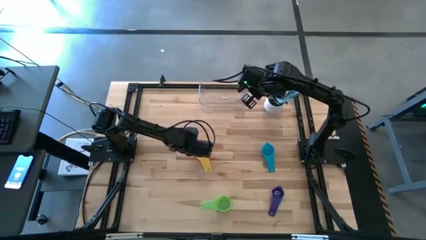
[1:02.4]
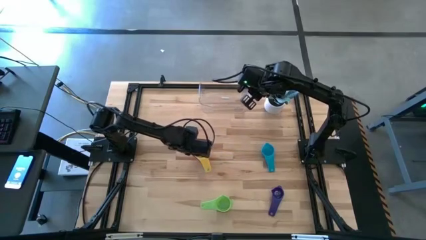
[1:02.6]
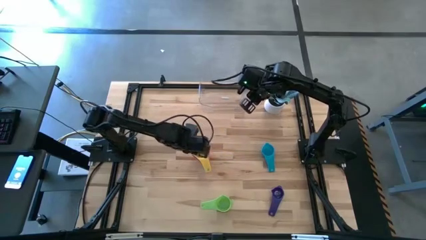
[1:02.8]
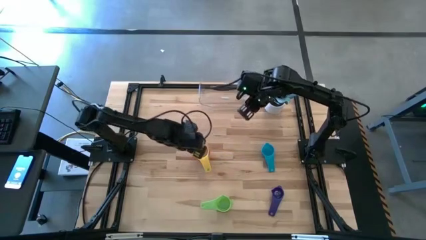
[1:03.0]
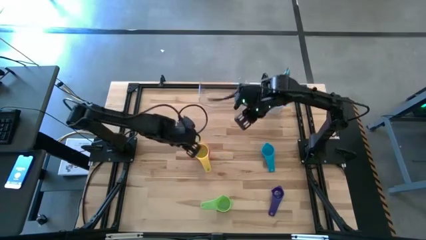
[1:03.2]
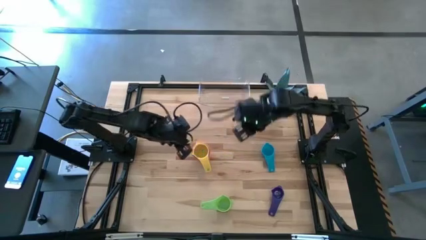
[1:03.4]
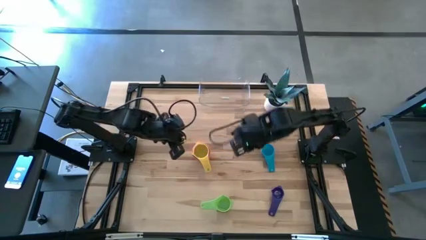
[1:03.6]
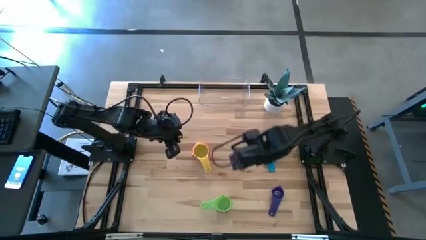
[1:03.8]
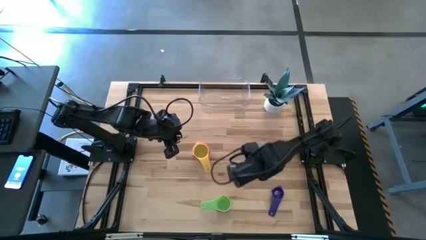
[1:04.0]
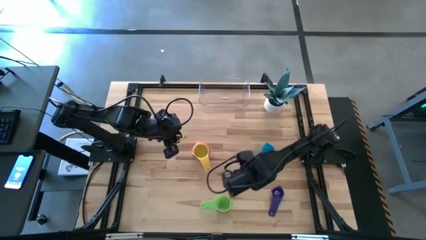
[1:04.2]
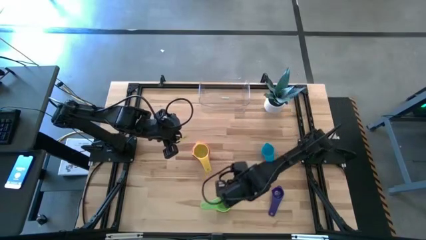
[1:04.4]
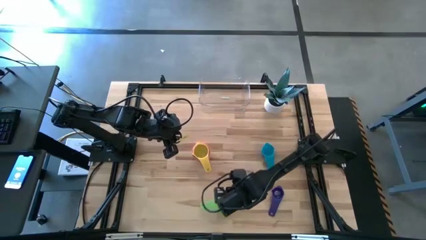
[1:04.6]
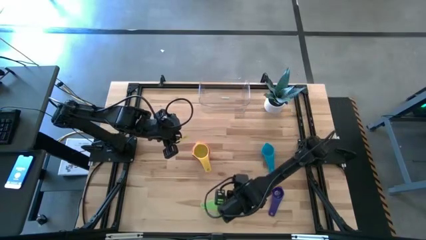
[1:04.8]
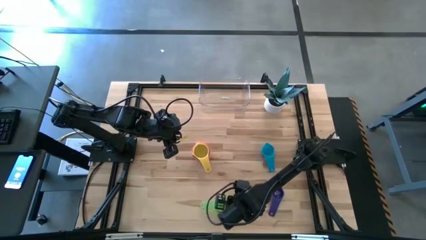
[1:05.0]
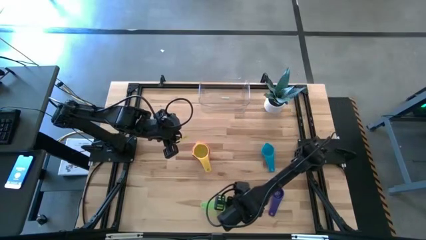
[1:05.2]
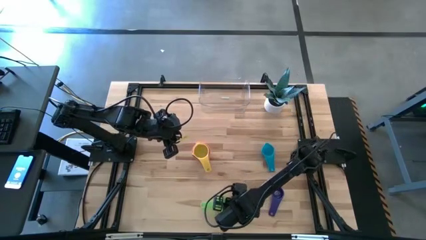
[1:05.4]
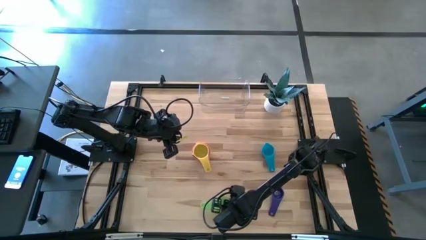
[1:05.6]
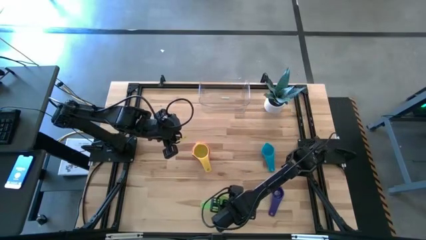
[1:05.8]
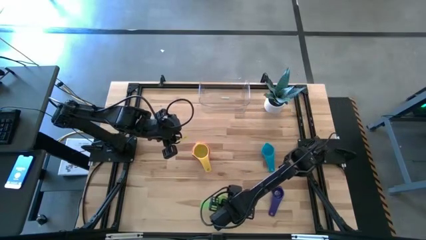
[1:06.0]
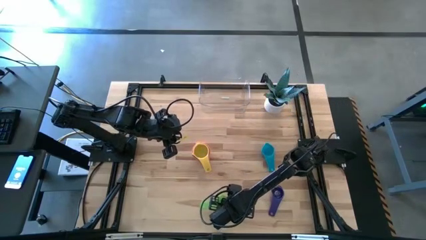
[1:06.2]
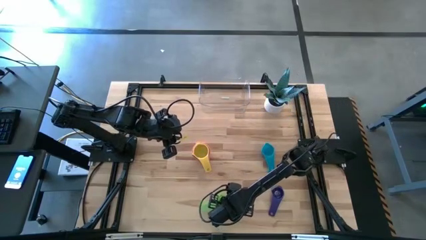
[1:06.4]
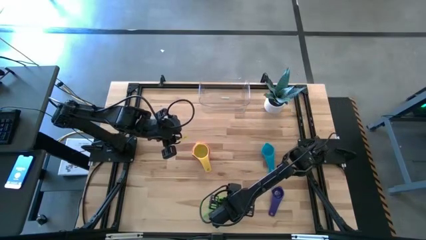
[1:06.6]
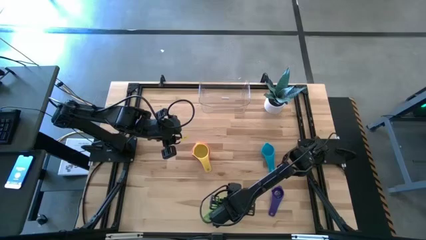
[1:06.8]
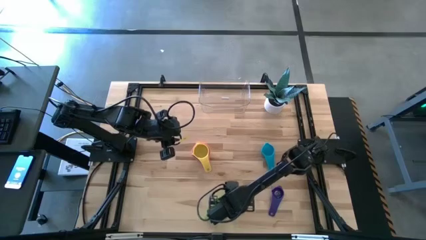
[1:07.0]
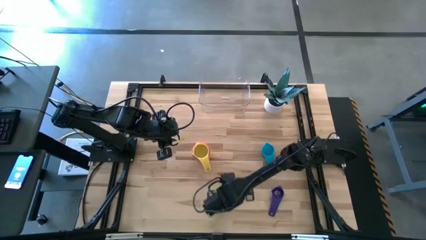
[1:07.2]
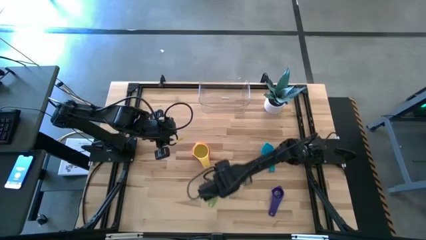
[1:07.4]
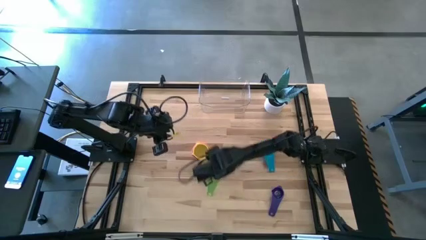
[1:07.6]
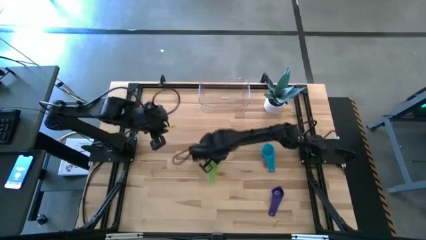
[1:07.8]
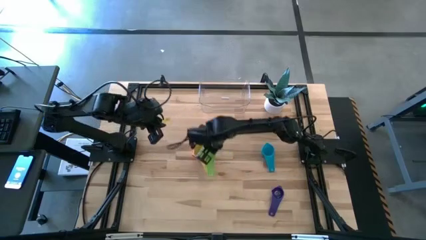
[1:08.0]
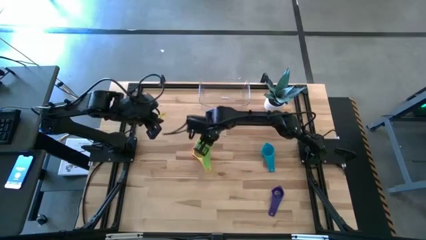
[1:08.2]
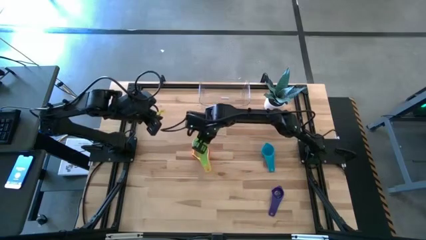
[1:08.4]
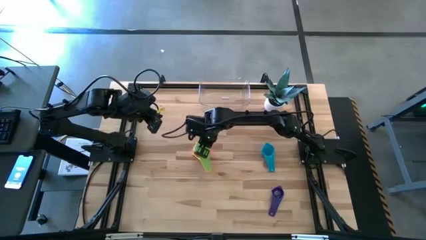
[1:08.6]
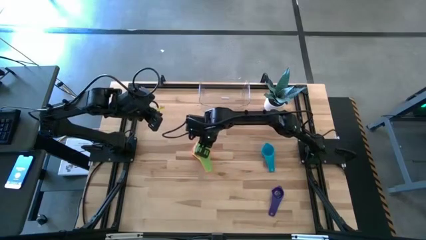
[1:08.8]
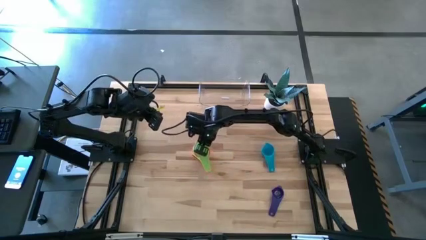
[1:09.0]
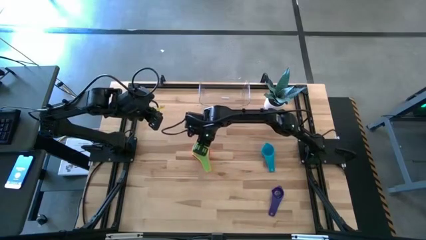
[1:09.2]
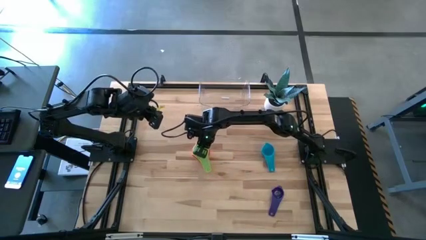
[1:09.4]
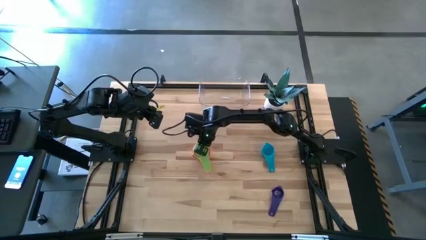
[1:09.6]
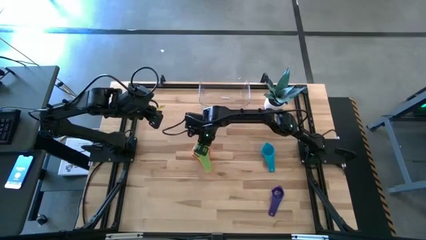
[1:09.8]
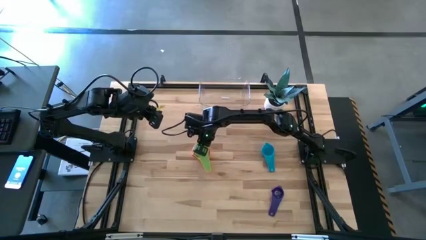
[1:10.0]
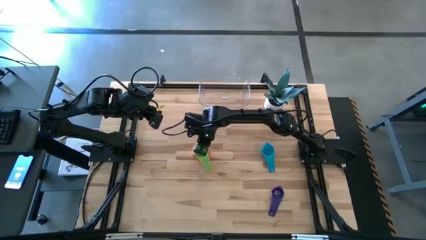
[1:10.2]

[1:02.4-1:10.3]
Task: Nest measuring cups in basket
Stack the green measuring cup on the top of the yellow measuring cup

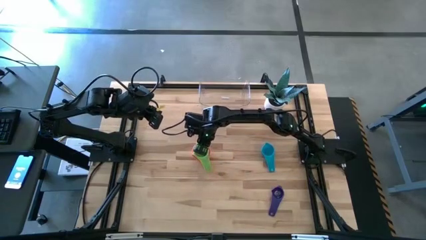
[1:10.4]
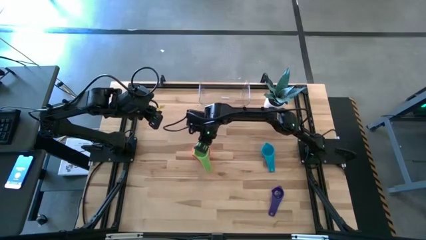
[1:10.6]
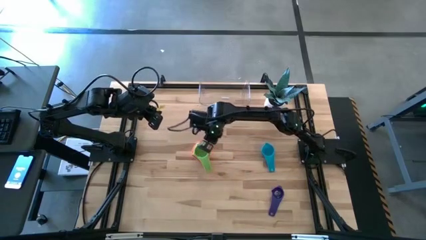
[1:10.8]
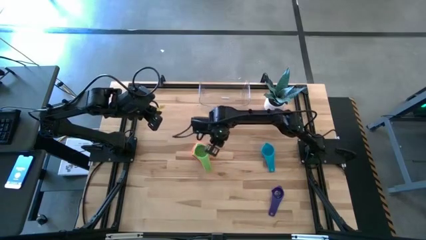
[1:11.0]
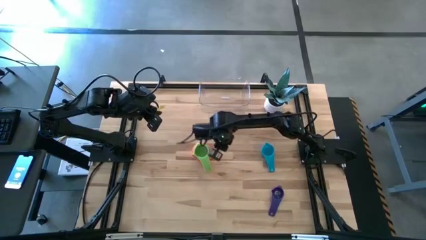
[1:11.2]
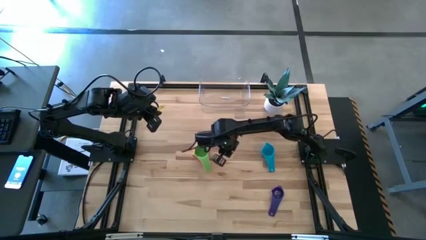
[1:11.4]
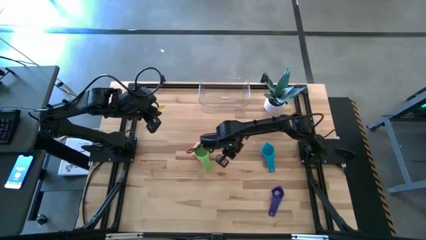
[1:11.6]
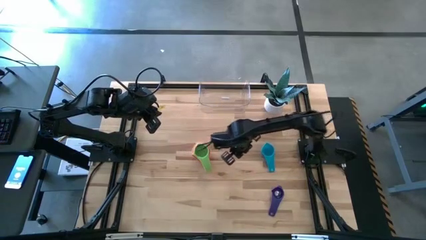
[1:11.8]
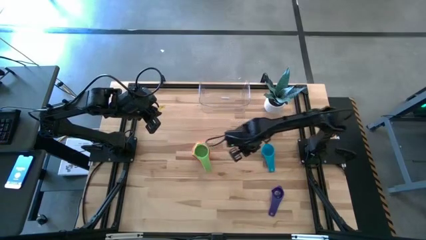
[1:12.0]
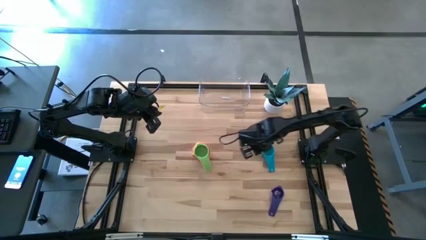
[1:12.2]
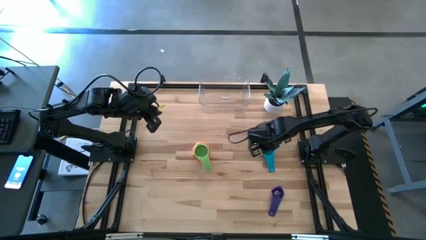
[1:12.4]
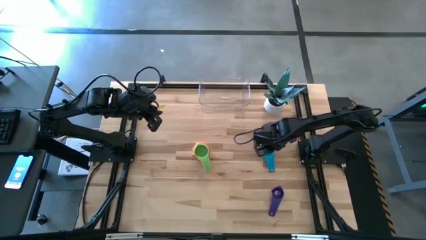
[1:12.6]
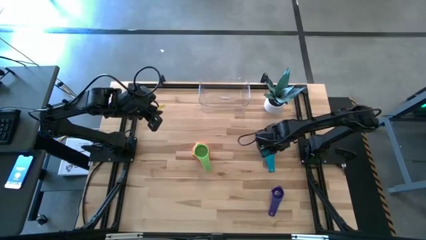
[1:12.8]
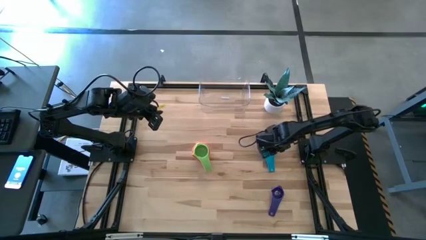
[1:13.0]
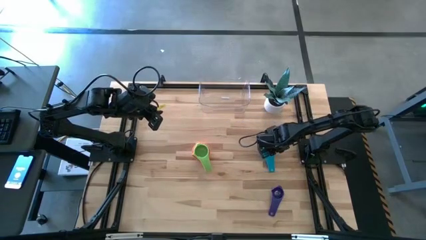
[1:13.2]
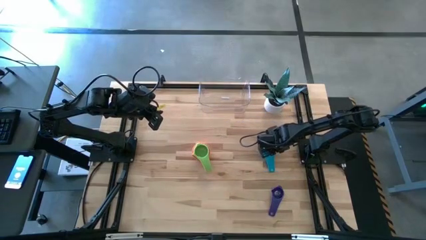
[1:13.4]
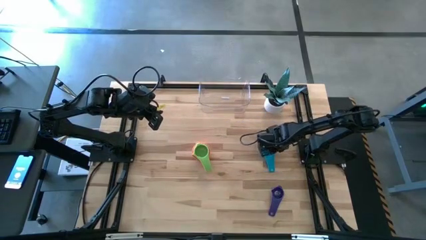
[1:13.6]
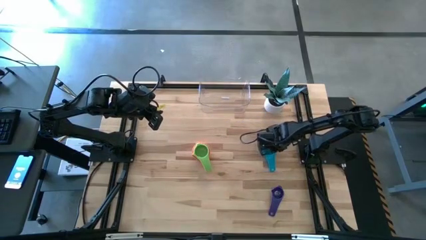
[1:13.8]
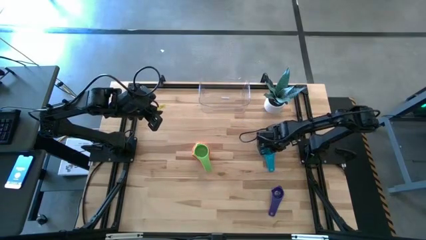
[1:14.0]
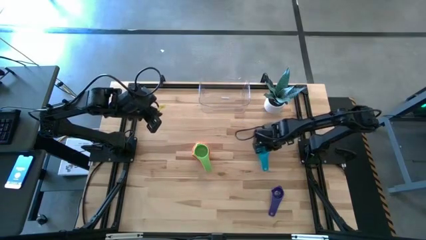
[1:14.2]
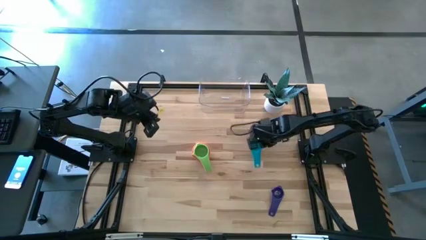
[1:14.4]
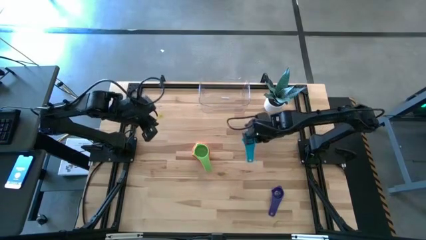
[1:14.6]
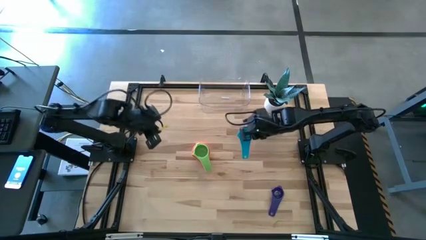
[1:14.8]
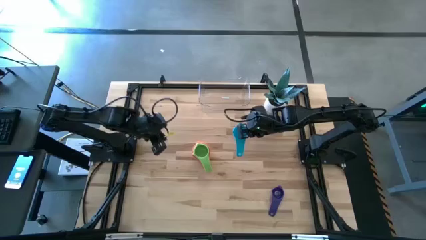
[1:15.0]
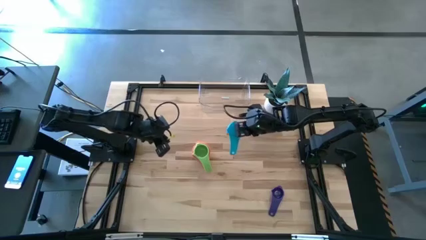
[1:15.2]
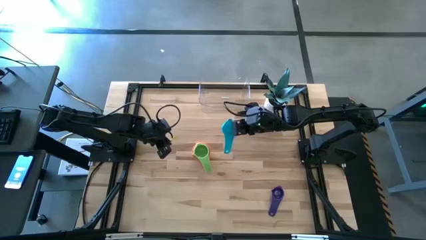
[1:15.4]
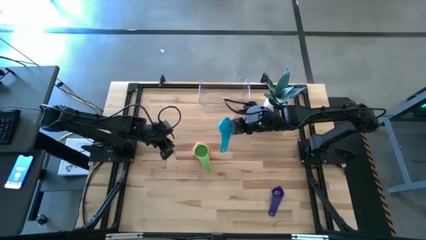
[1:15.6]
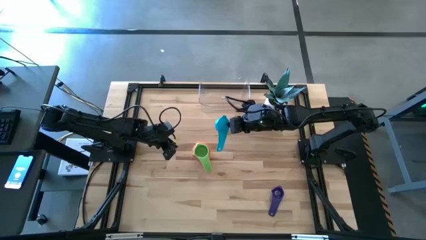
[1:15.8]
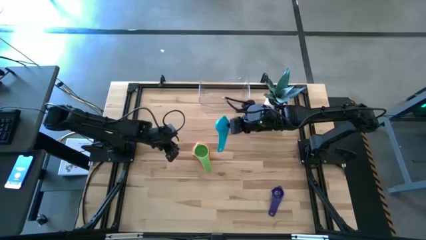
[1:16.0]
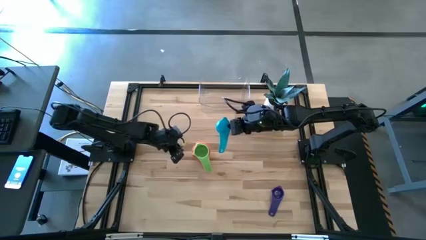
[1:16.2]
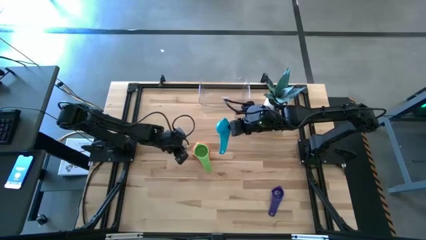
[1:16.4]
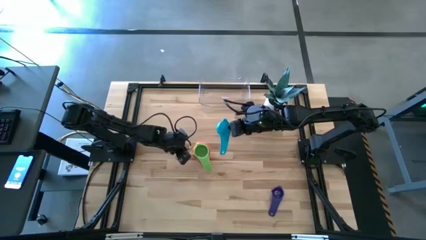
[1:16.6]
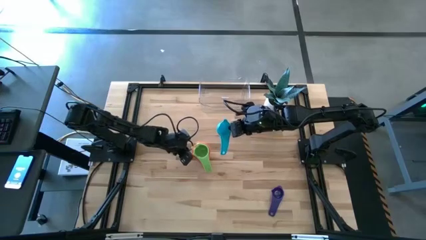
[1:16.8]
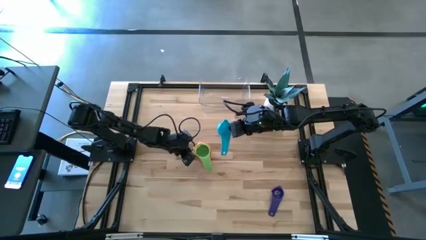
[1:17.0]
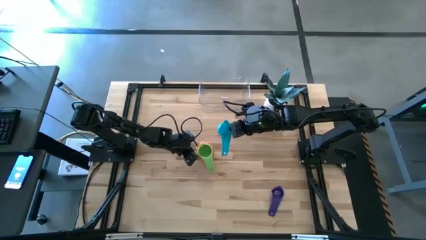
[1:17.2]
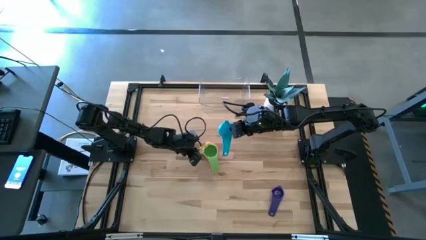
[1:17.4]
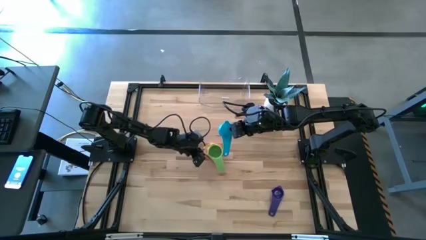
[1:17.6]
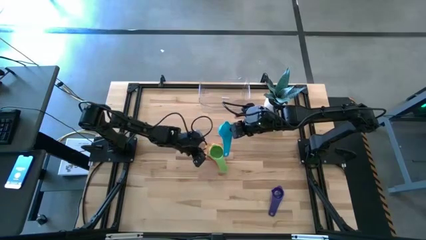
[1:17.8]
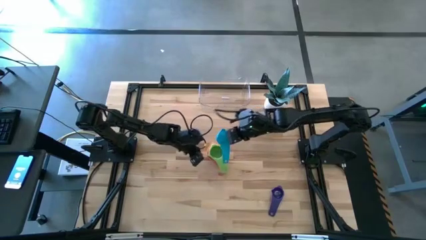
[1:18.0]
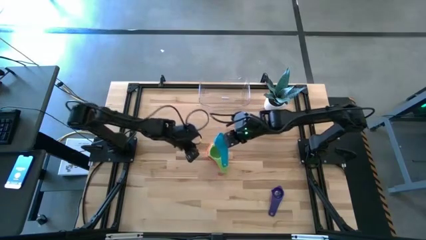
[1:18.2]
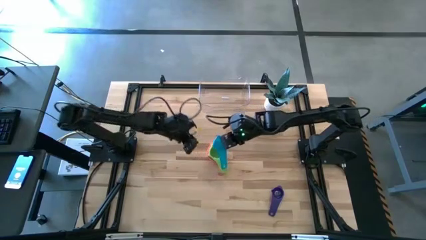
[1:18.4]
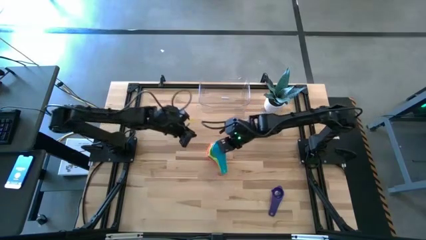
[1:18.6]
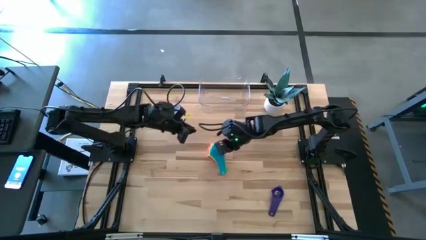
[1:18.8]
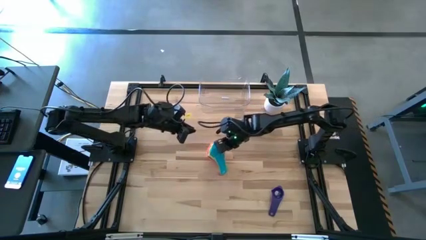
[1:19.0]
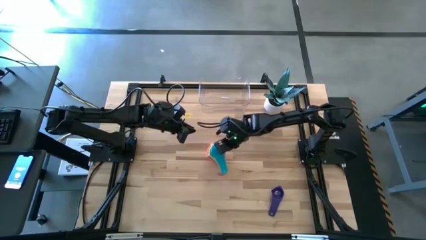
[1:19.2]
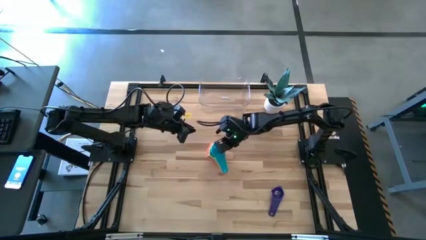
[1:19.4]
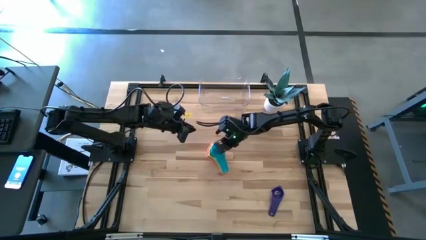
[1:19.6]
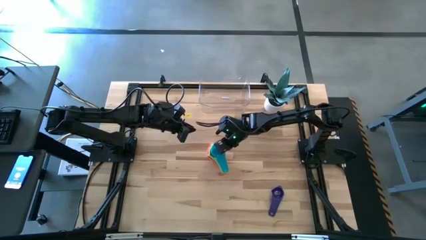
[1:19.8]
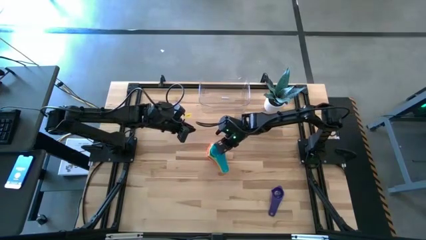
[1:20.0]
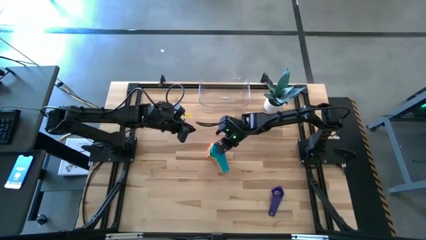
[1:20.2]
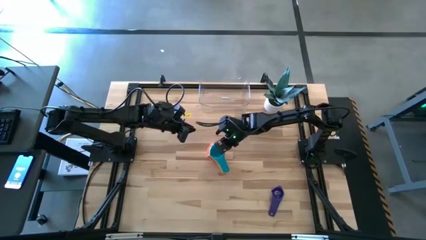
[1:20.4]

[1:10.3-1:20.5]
Stack the light blue measuring cup on top of the green measuring cup
